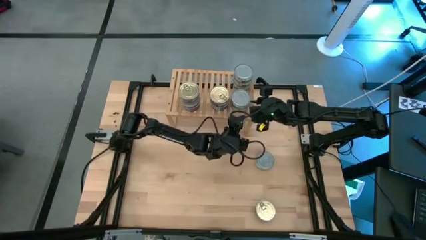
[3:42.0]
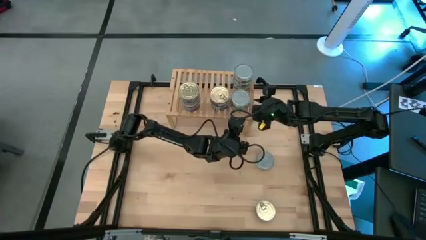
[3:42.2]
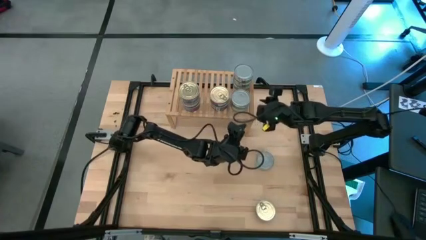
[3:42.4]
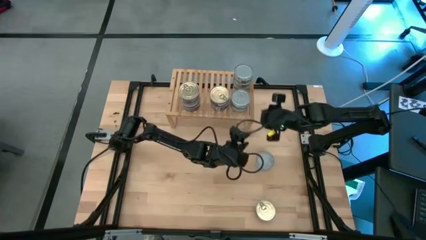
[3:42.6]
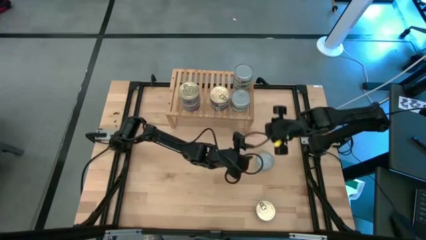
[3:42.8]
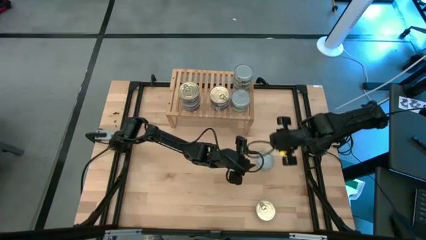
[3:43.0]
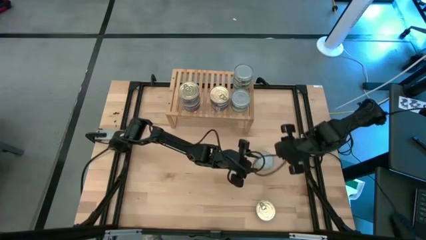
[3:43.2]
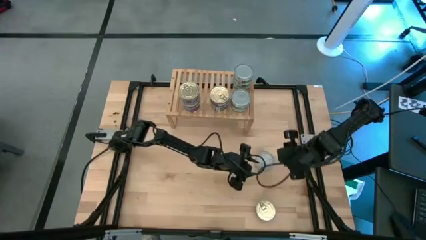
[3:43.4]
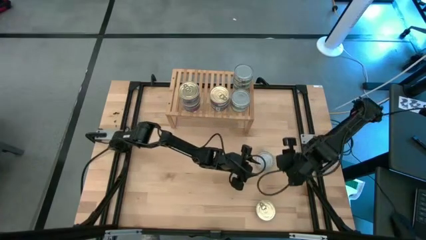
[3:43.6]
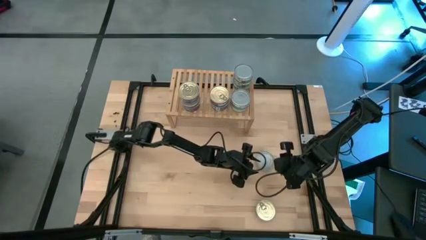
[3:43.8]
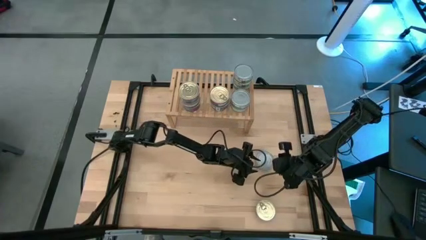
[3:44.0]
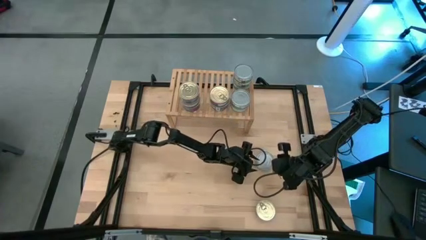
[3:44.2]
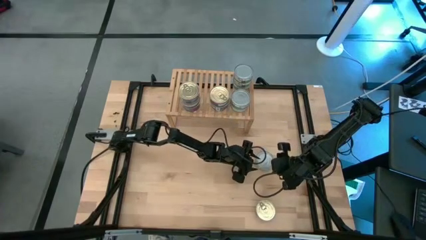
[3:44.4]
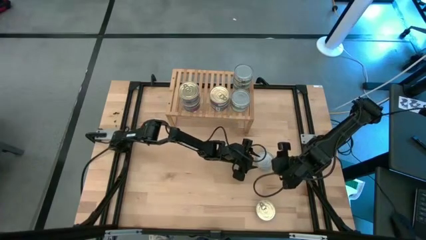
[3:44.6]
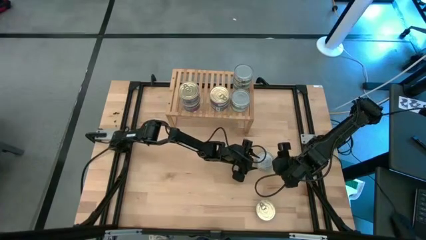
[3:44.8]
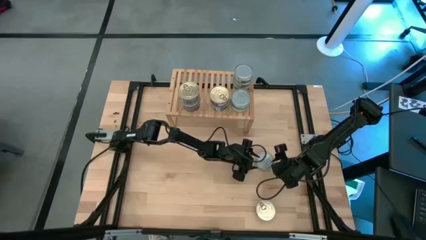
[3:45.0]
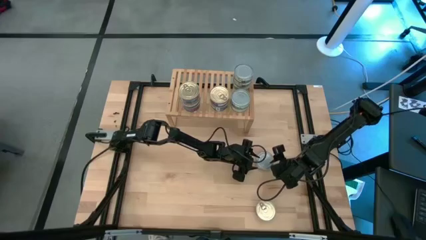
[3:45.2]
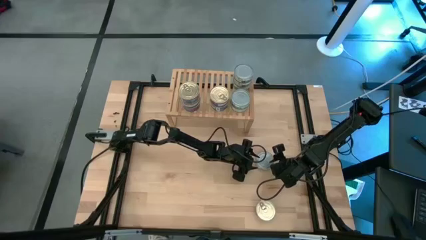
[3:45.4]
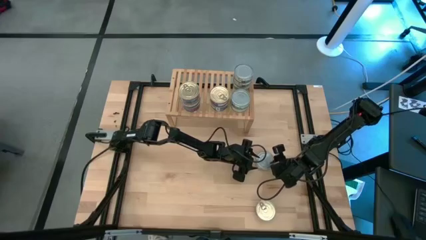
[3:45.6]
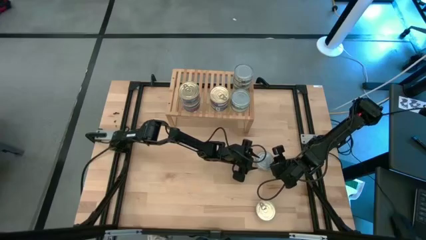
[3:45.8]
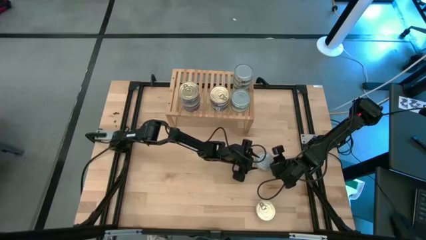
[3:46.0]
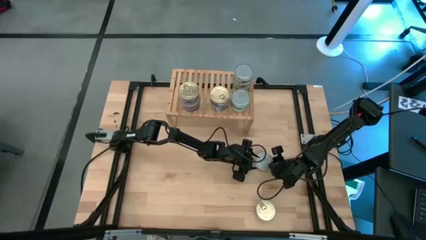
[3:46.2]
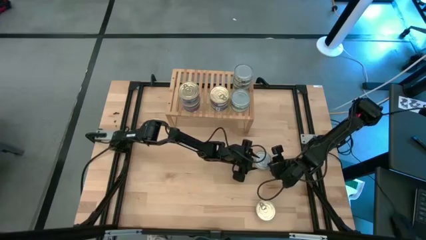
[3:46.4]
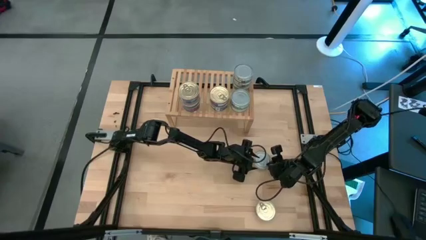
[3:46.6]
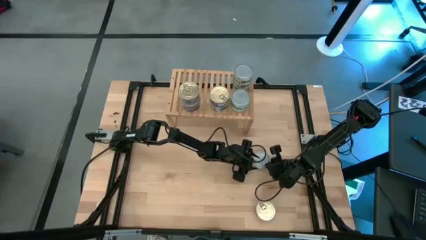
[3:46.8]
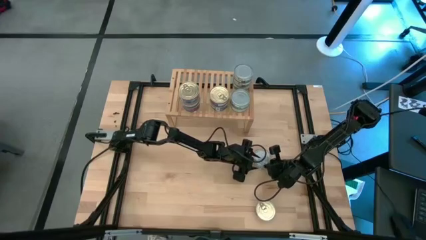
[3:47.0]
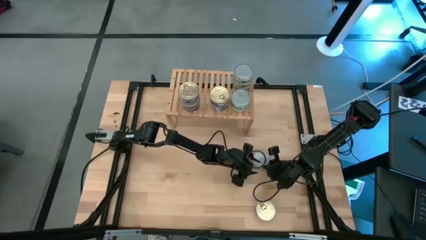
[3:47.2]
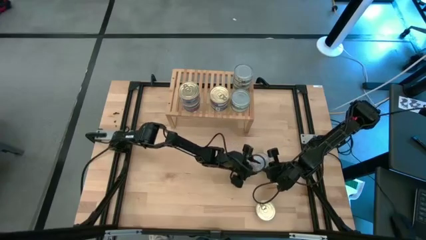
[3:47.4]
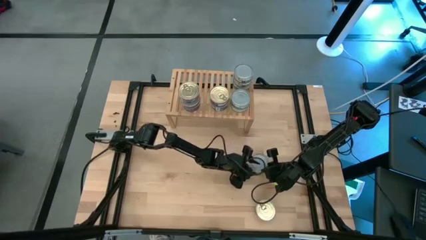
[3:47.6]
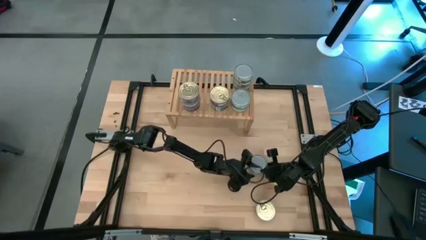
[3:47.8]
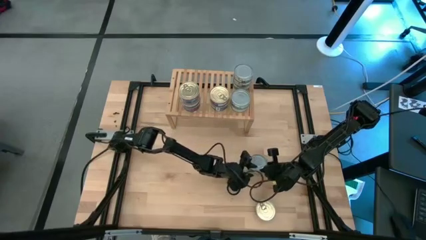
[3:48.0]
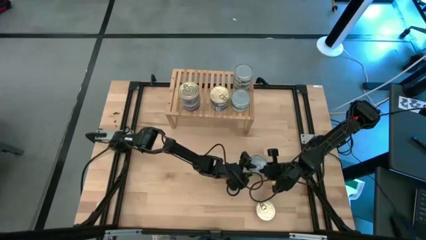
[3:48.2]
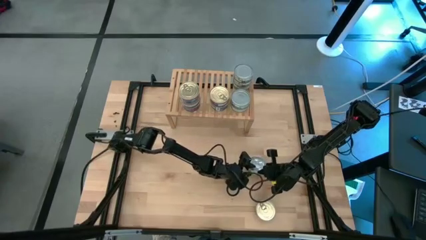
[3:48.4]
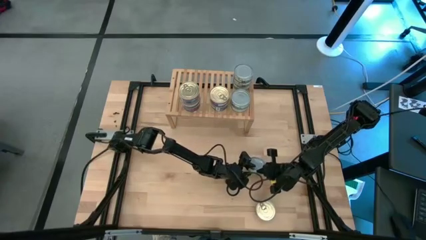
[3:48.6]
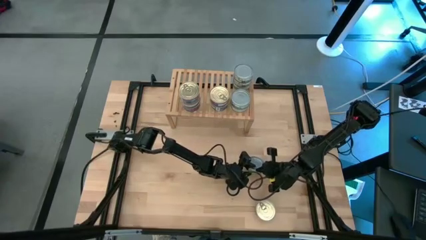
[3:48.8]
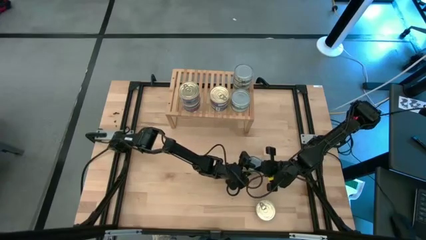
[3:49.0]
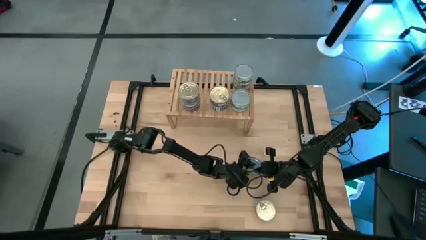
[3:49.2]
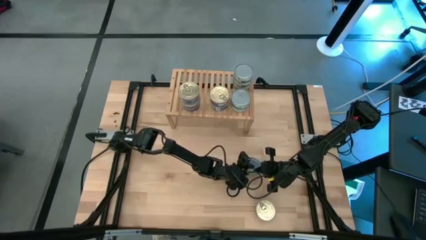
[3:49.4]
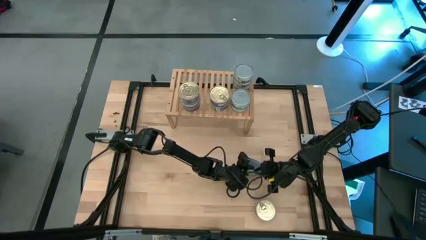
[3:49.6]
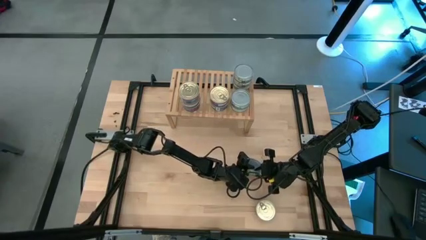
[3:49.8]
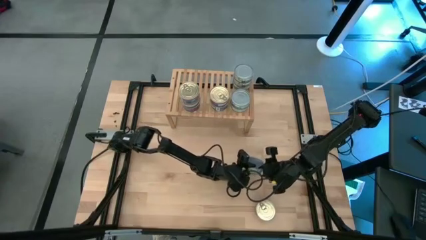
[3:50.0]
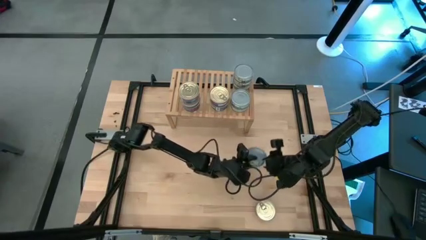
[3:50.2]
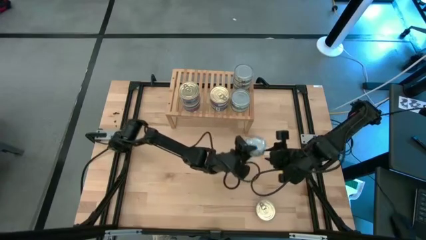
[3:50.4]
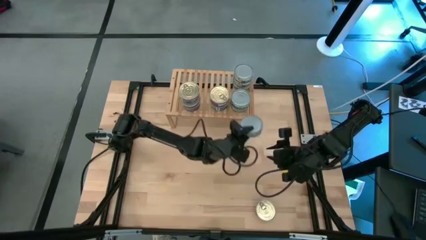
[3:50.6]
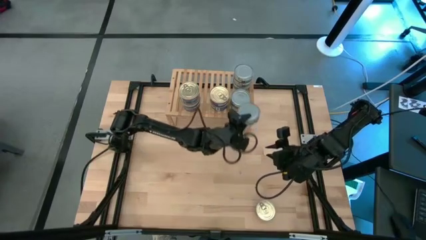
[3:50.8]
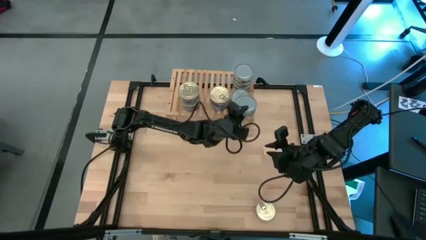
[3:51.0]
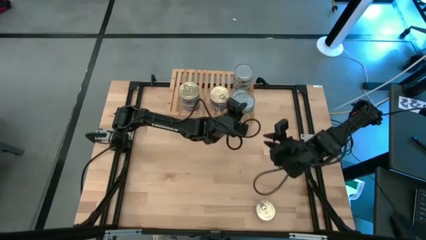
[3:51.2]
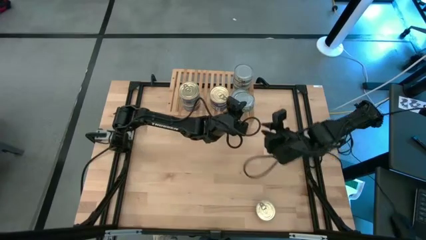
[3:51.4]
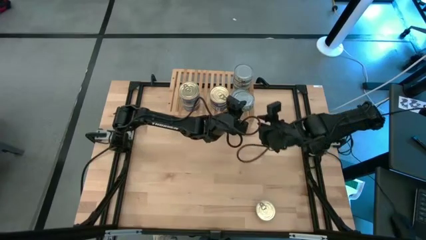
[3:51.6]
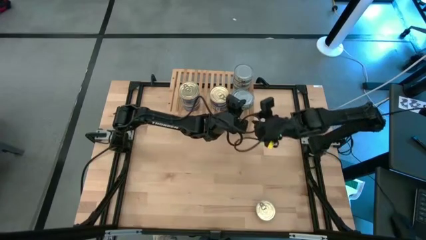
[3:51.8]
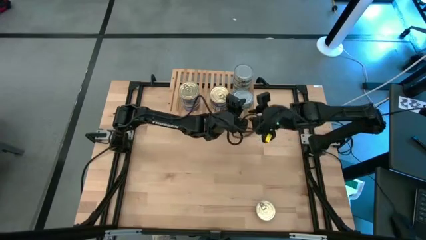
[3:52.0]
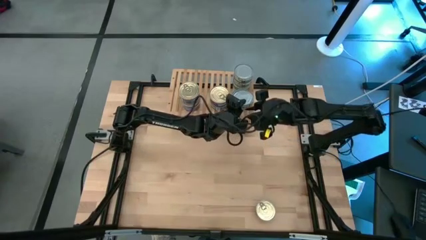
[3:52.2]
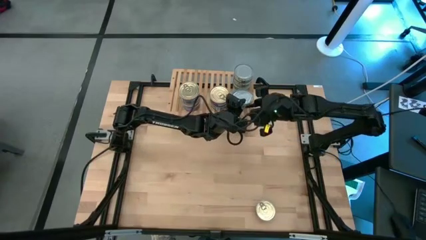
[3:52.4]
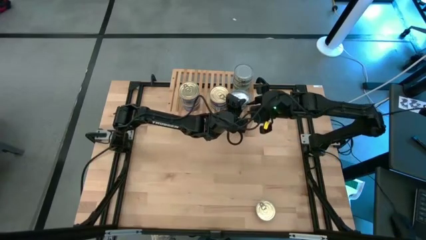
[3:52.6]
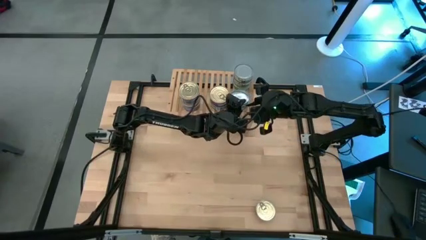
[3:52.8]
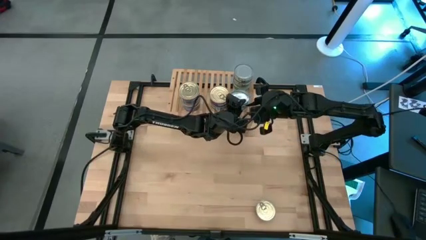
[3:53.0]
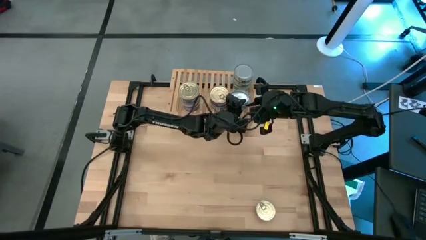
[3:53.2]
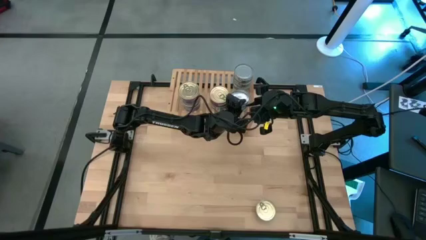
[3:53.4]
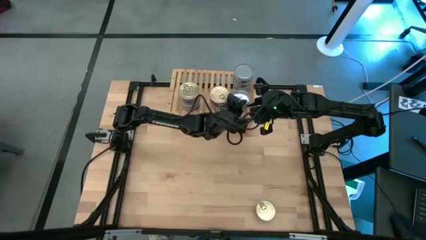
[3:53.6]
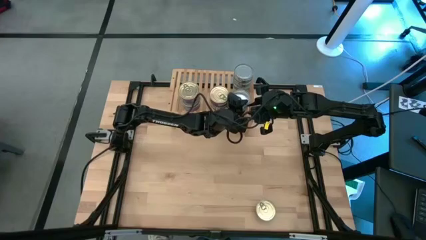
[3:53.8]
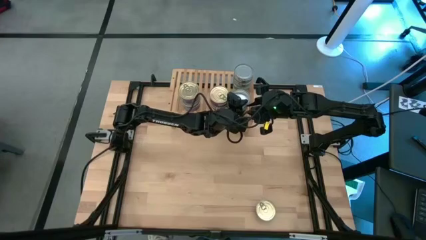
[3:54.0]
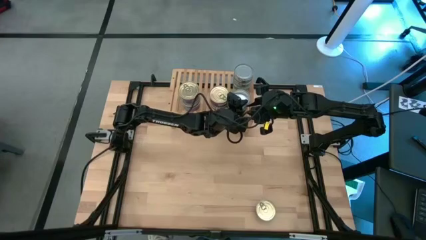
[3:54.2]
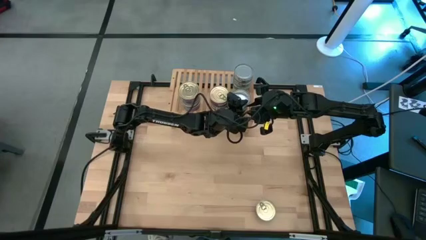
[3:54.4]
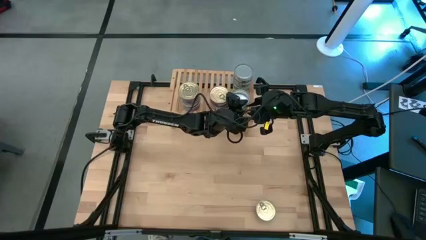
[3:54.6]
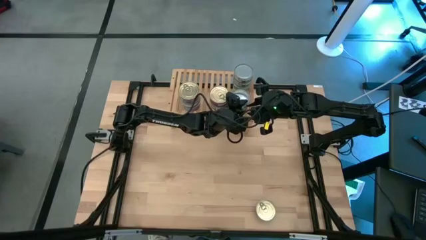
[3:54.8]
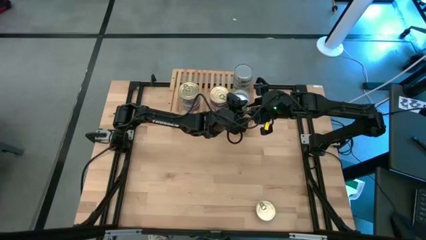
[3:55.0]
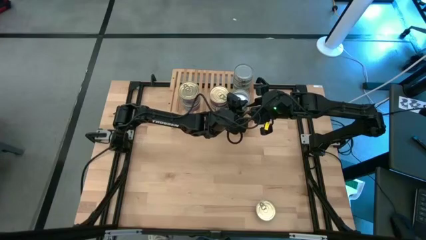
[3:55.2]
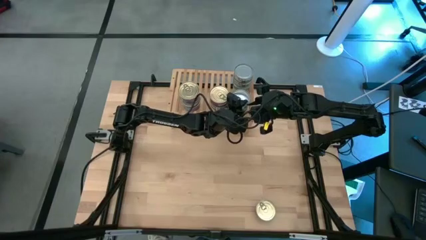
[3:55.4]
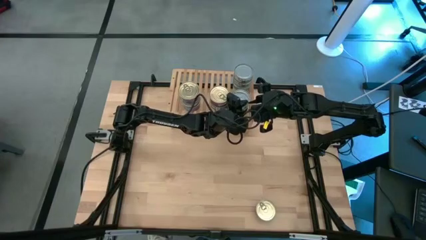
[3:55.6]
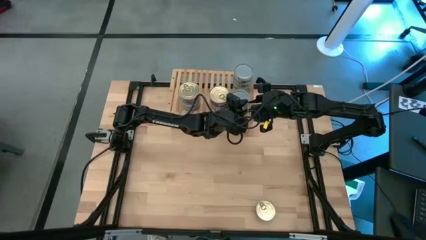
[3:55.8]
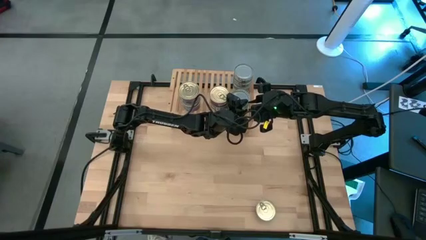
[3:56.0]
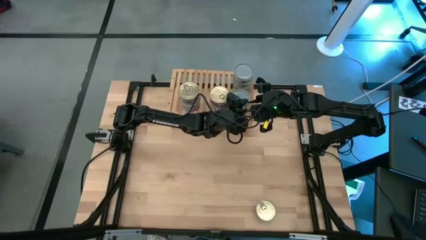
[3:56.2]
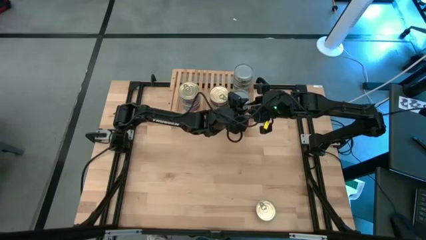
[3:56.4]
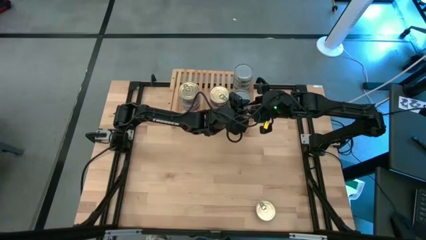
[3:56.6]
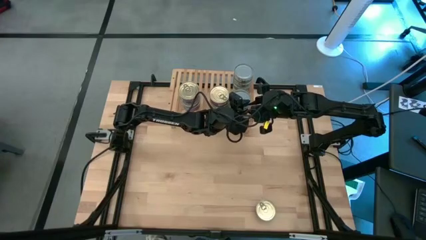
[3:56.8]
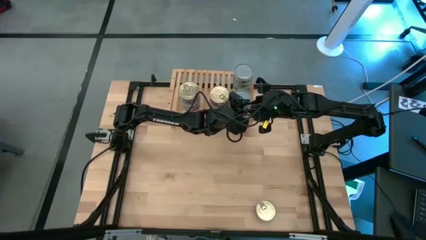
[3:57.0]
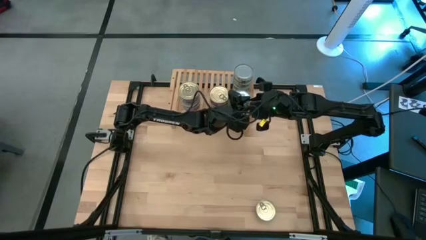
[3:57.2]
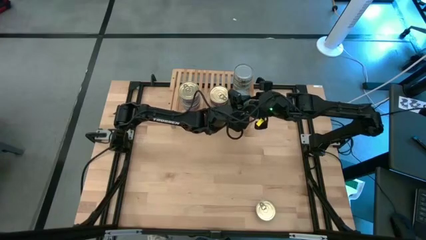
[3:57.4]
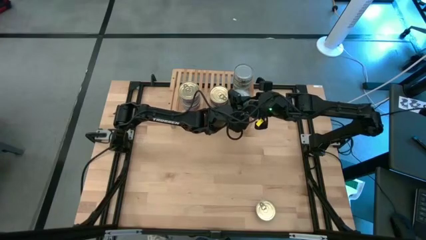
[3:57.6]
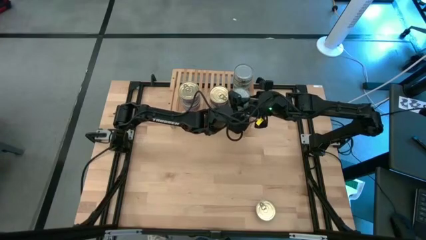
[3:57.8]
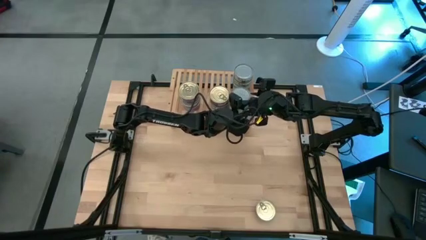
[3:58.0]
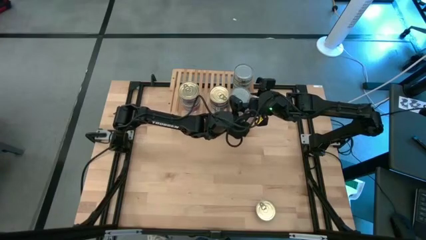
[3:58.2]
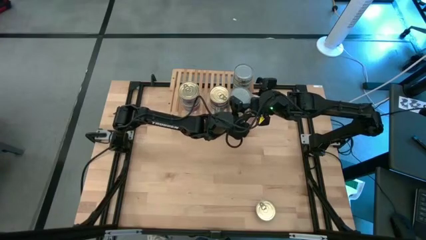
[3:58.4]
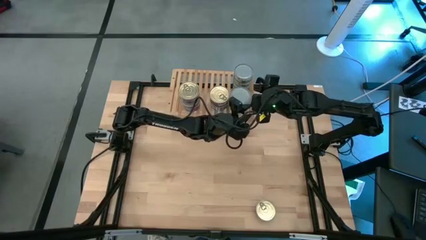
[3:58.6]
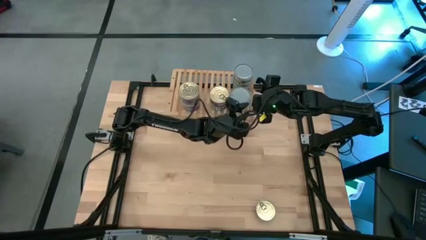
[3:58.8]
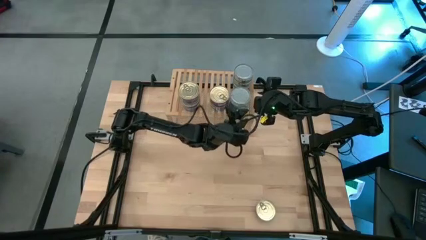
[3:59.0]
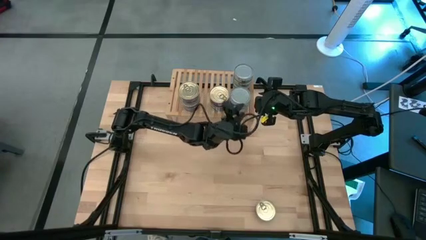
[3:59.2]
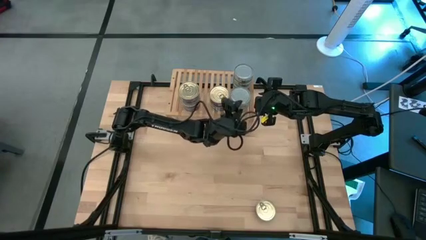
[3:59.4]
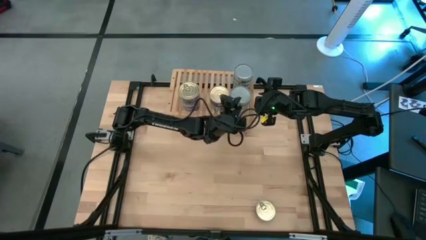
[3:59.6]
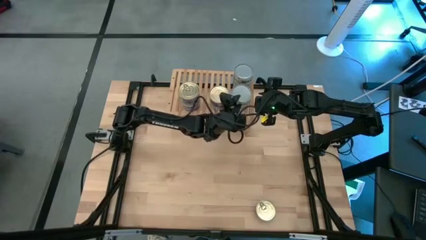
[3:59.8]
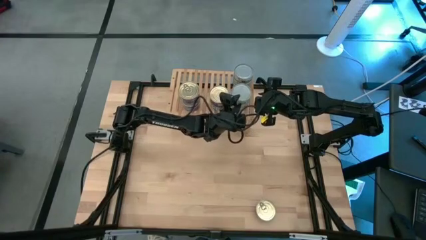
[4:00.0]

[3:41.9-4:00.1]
Task: Stack canned seafood by type on shelf
Stack the green tuna can on top of the green tuna can on the shelf
